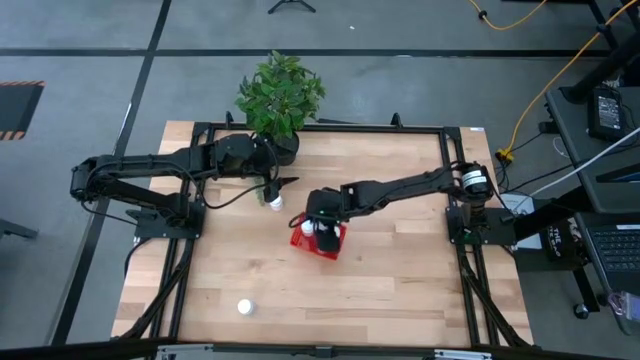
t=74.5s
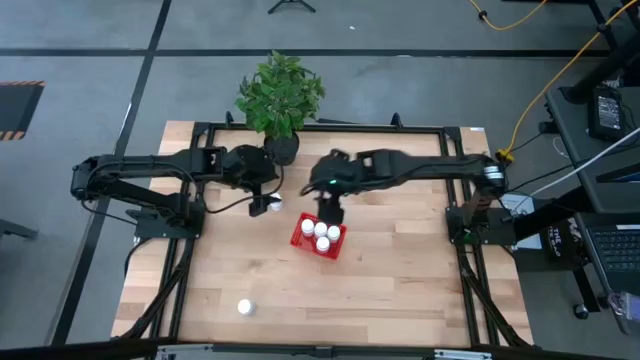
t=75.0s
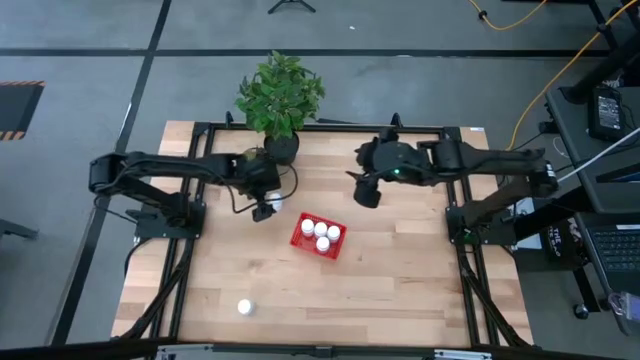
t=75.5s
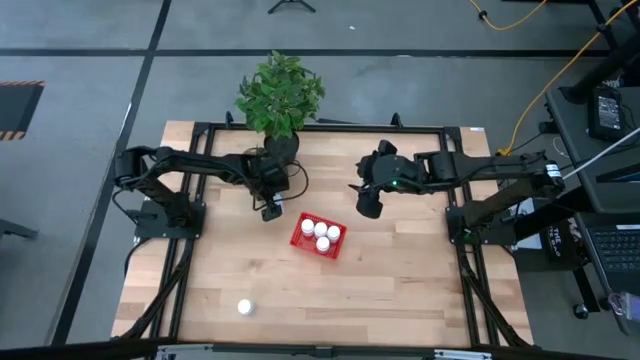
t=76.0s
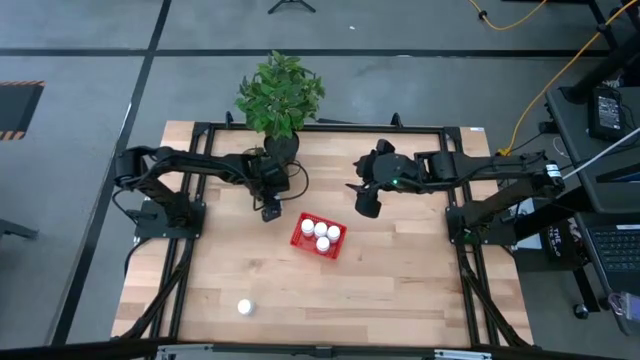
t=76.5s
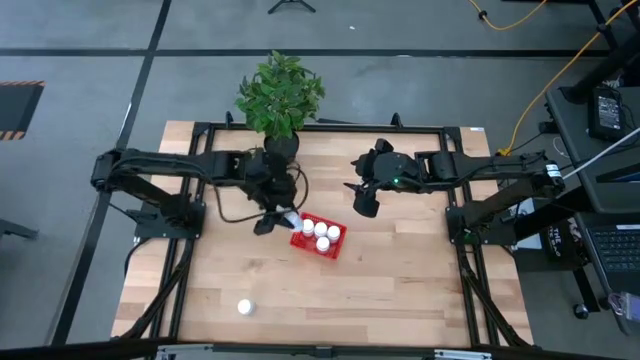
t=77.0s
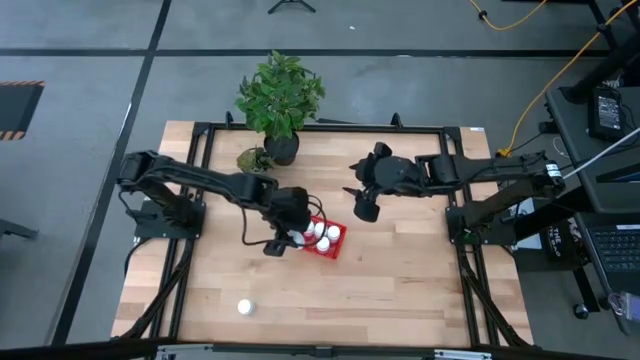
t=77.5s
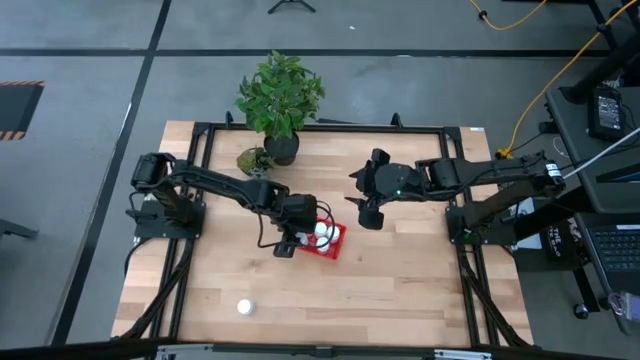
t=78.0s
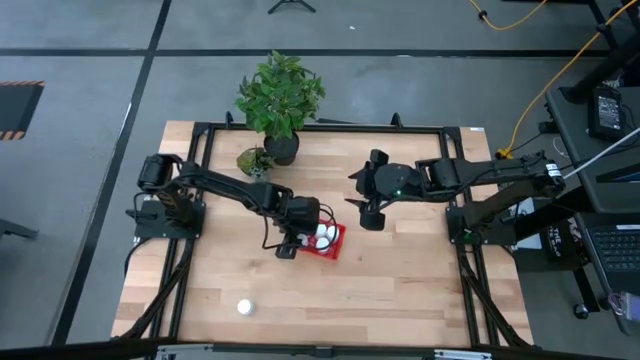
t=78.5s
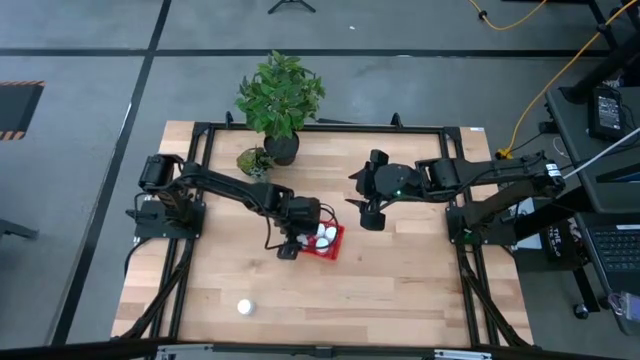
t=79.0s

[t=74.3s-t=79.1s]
Task: Pick and place pill bottles into a basket
Put the white pill bottle into the bin

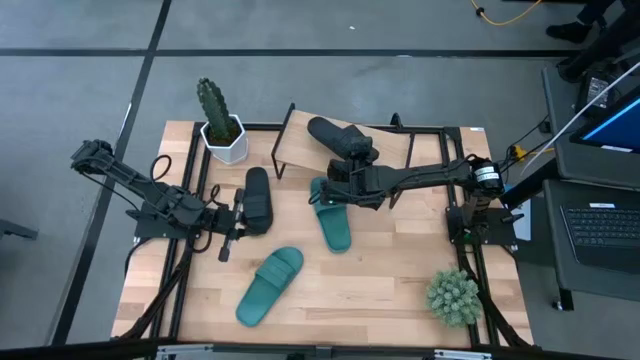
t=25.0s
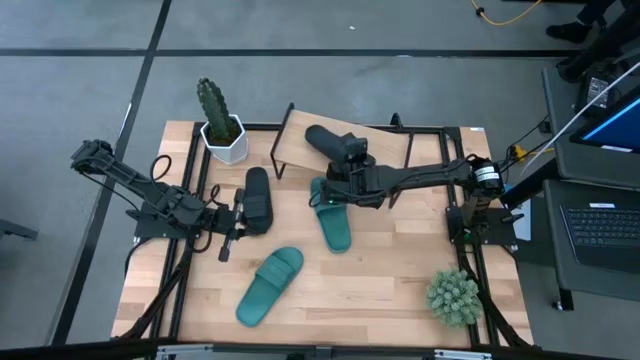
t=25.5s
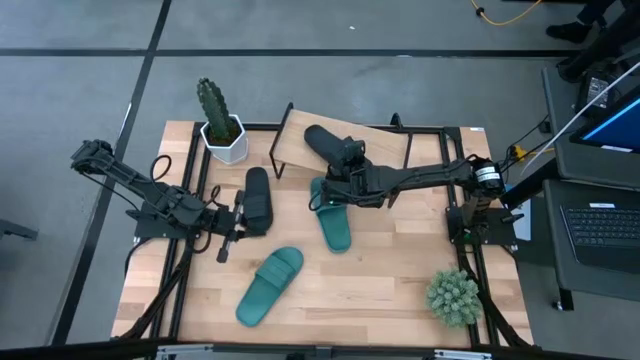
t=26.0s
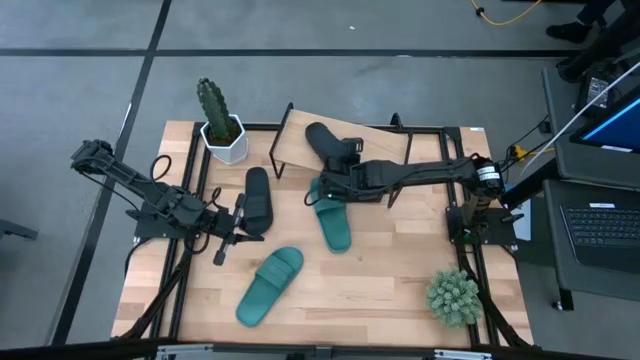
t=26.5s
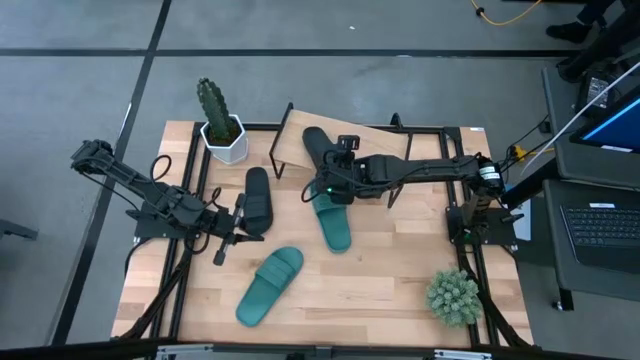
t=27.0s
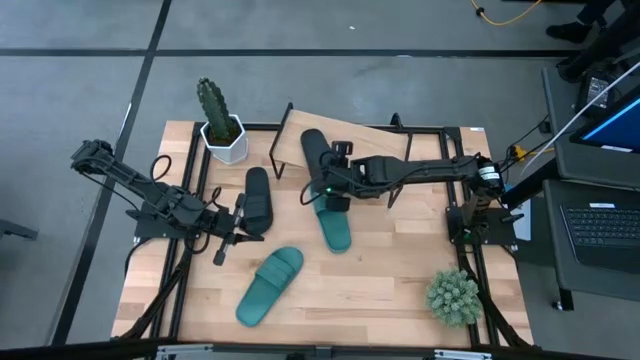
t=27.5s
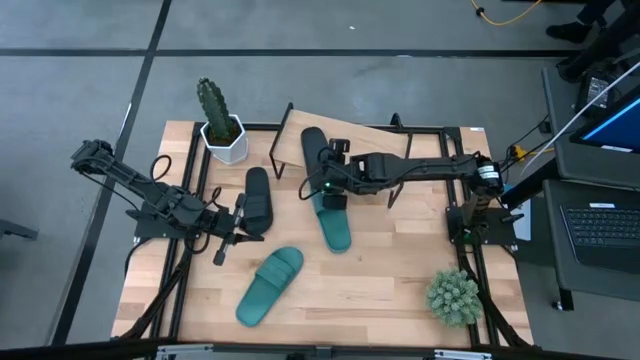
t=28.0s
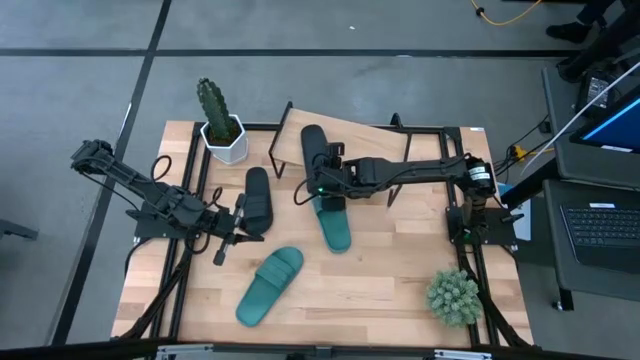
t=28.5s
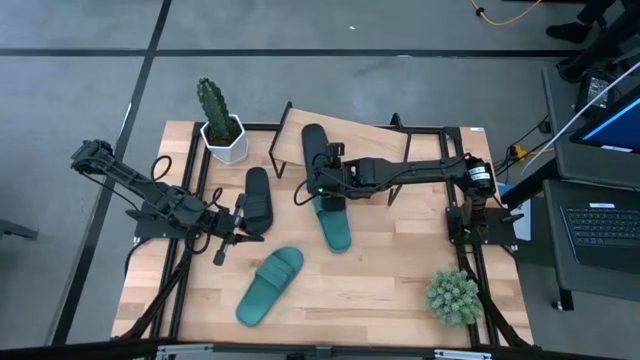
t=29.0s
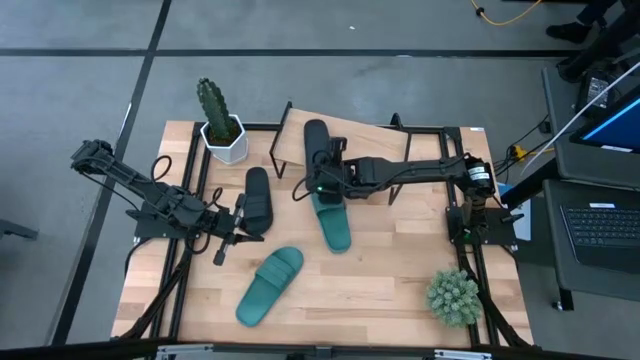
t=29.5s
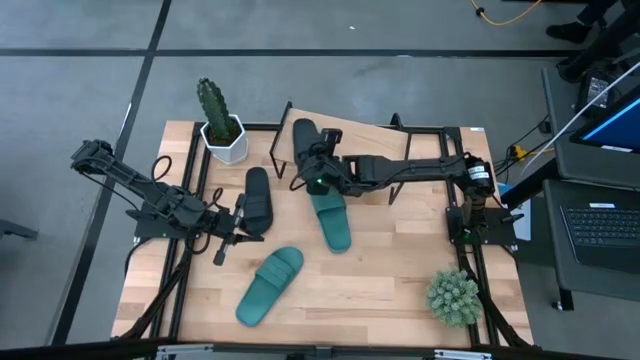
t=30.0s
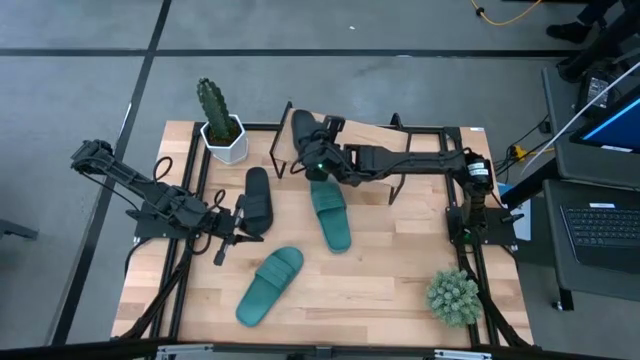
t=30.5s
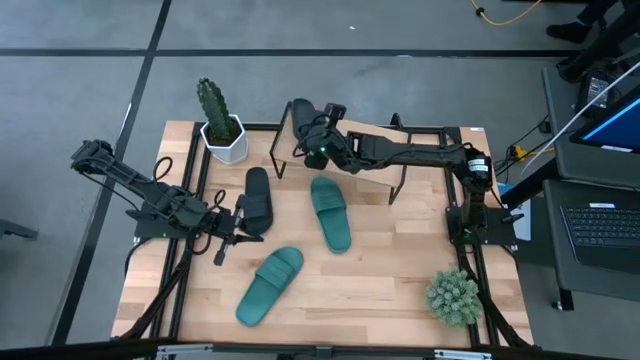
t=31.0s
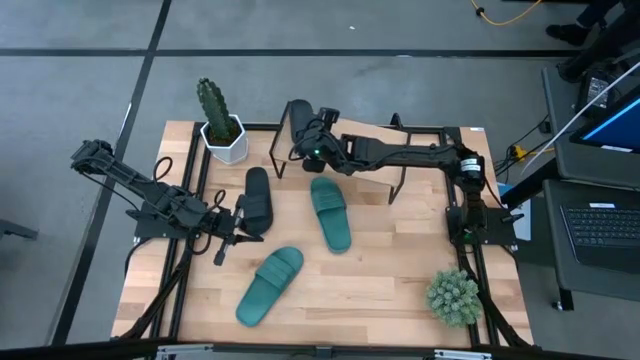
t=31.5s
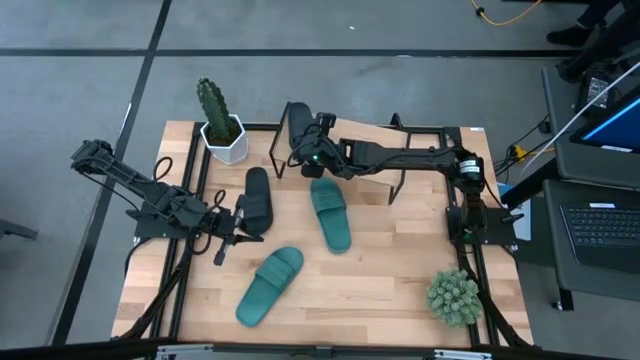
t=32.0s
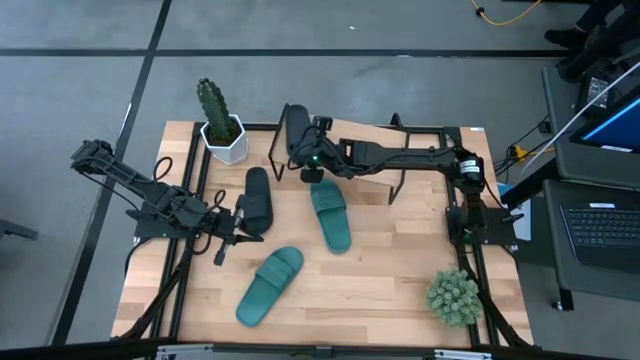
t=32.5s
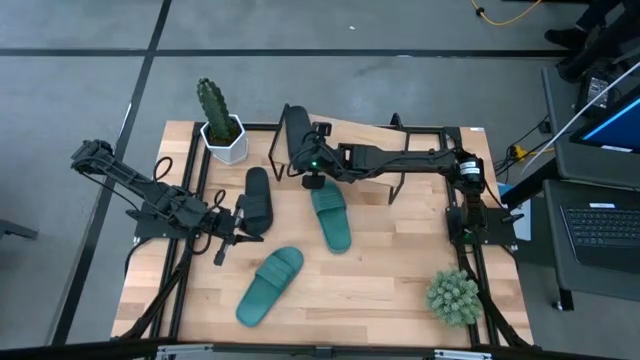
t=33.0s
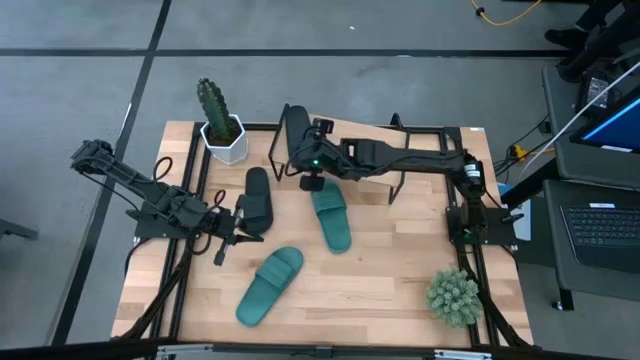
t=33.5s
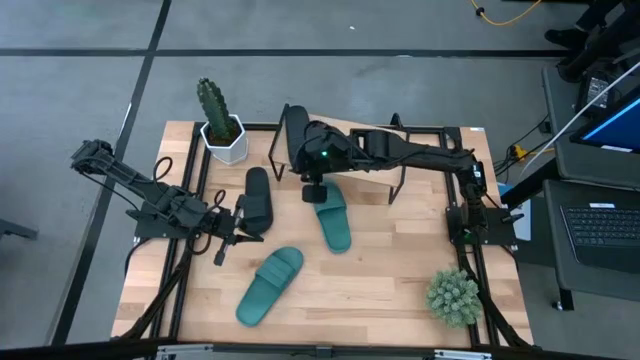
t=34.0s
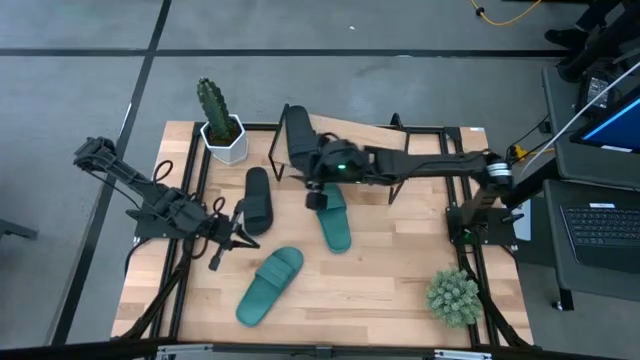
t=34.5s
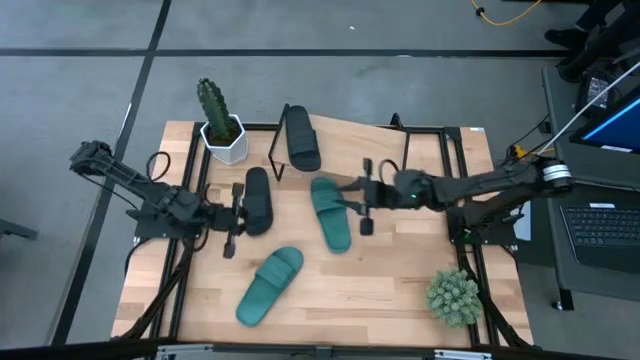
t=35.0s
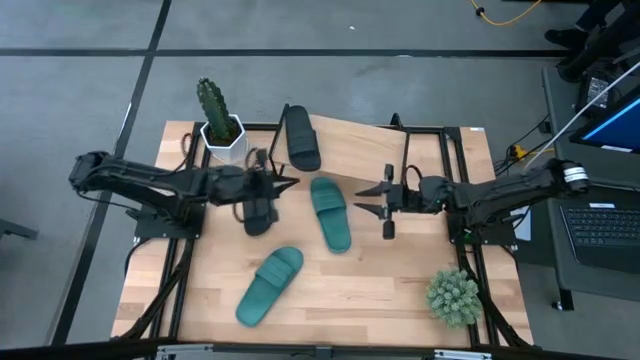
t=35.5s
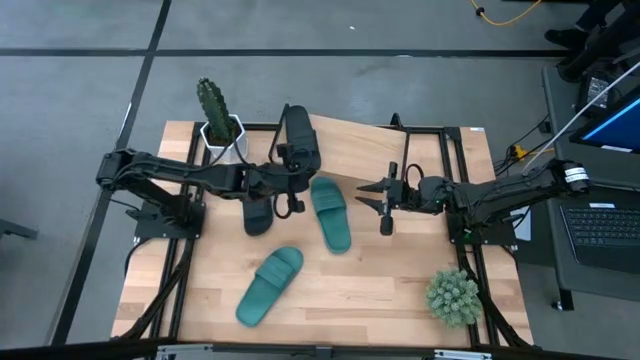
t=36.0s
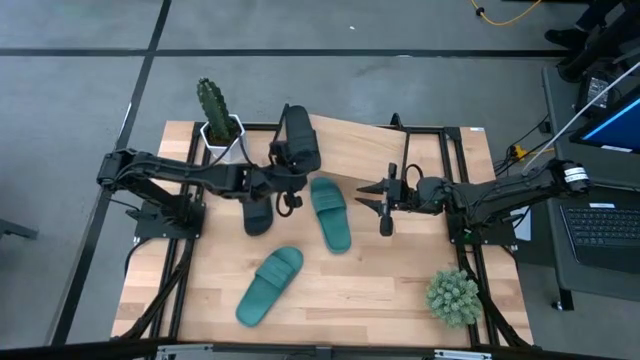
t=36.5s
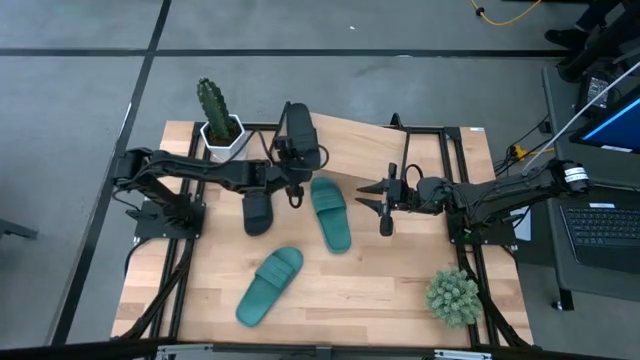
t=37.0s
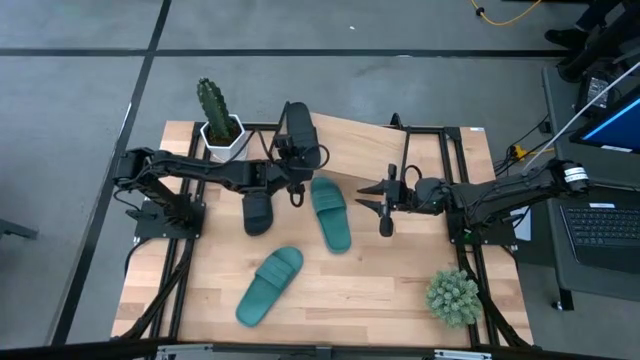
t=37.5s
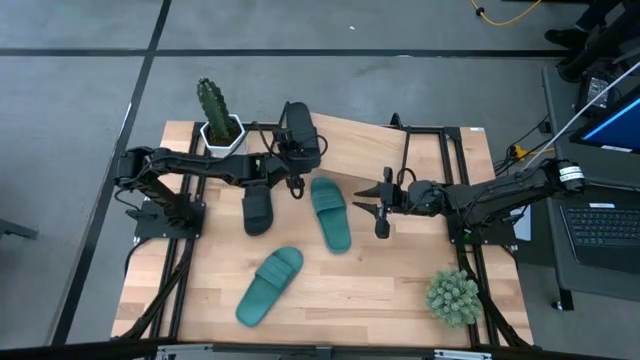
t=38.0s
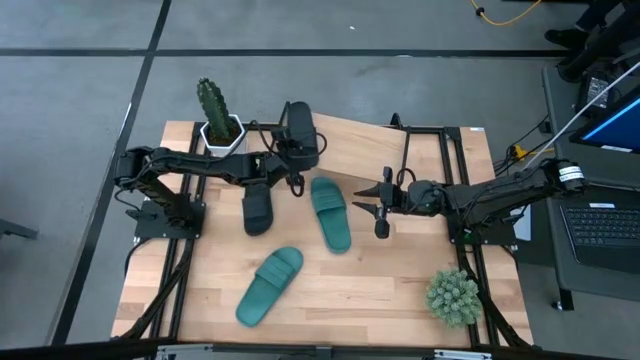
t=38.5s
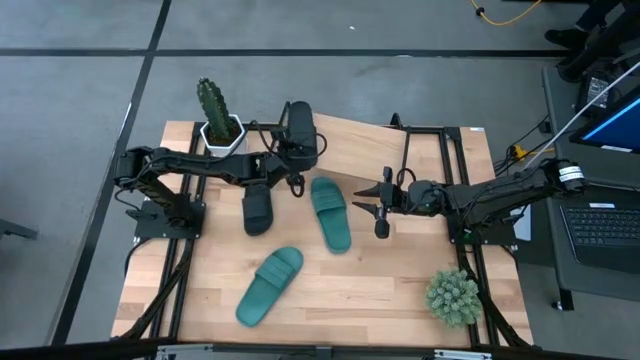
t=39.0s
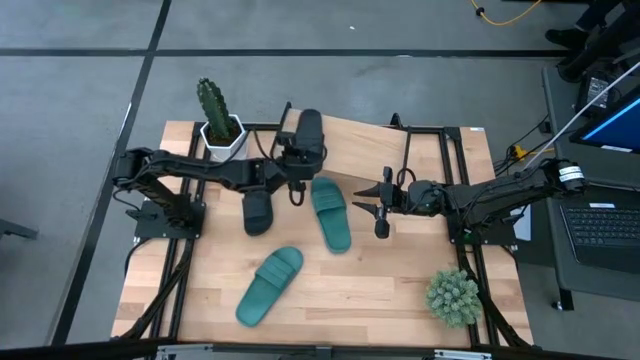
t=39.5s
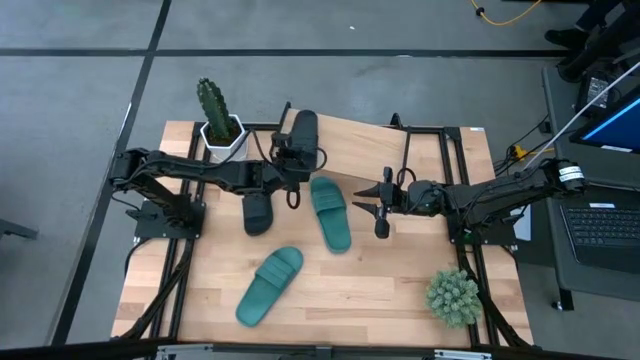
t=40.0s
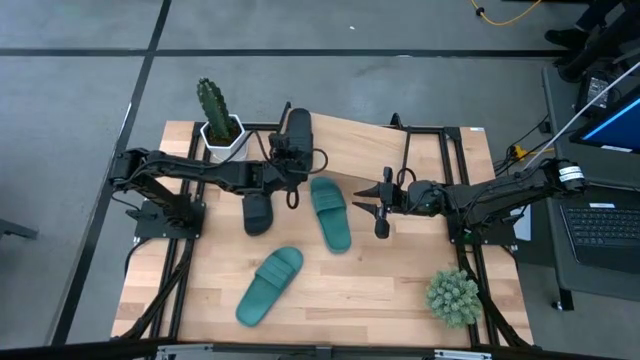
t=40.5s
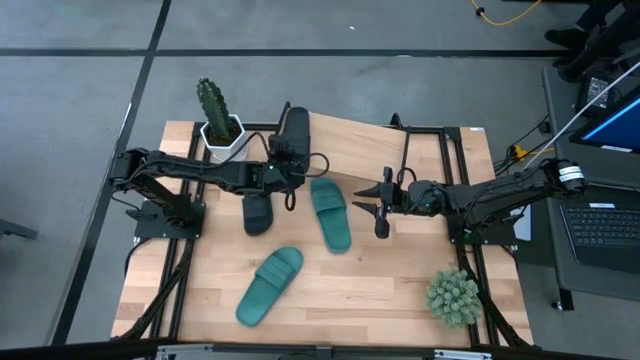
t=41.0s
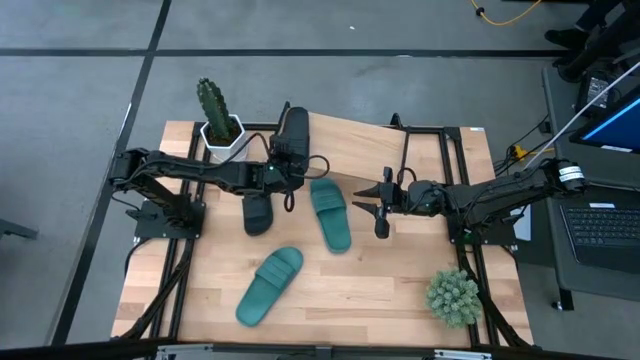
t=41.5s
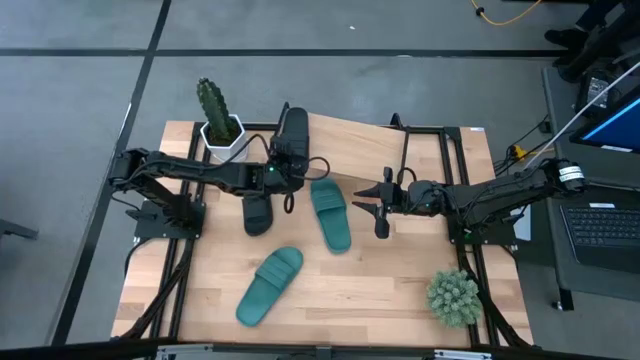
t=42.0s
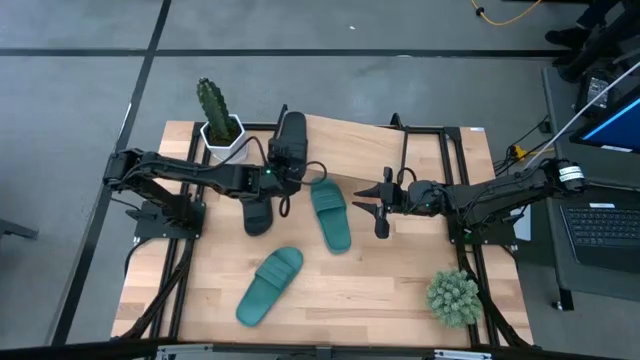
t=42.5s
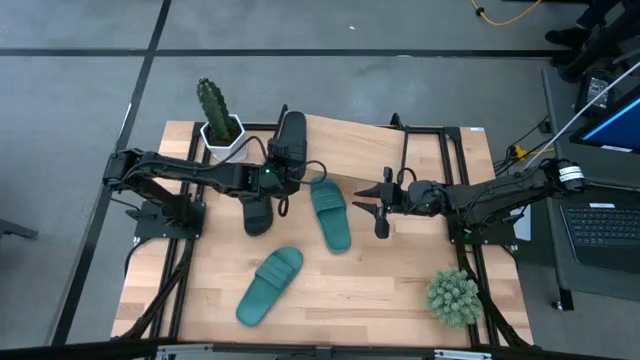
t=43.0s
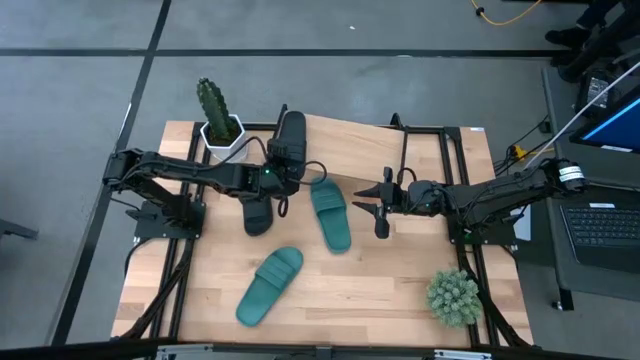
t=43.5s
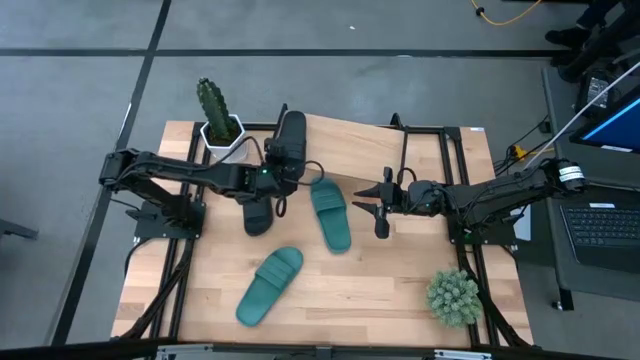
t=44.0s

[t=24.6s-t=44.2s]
Task: Pick and place slides into the shelf
Put the bottom black slide on the shelf
